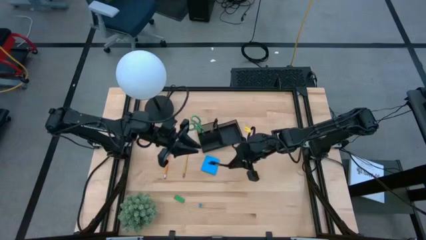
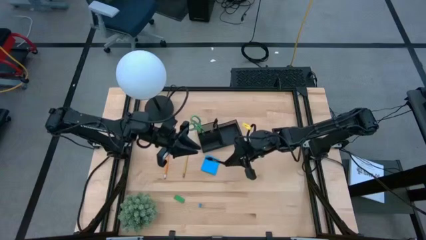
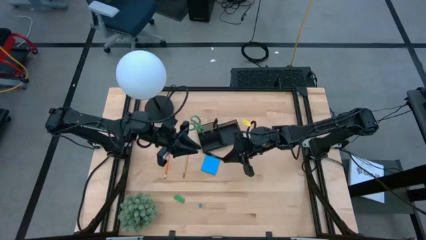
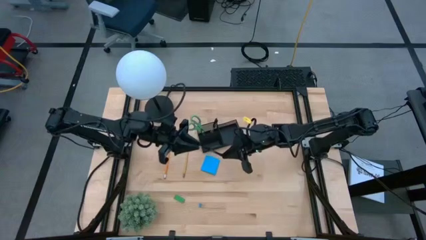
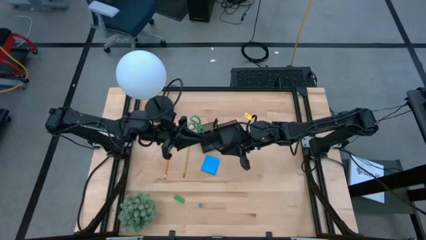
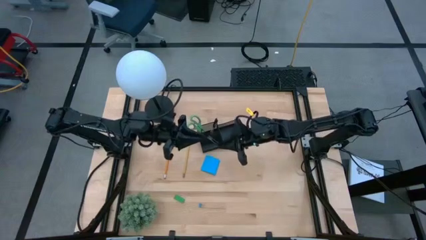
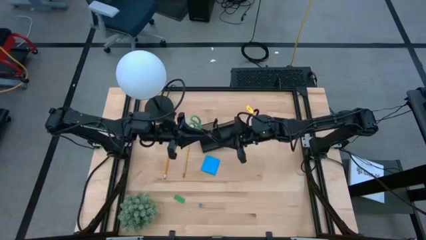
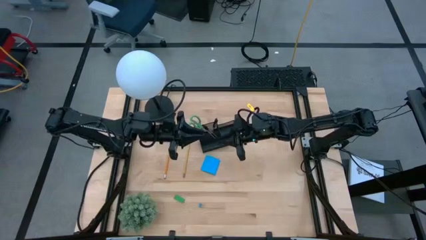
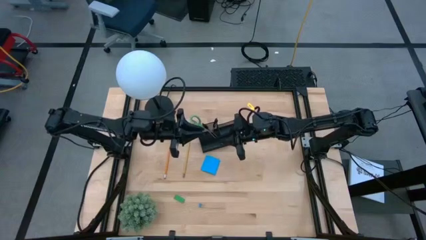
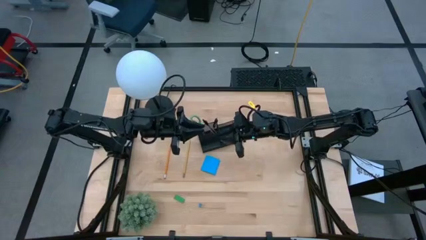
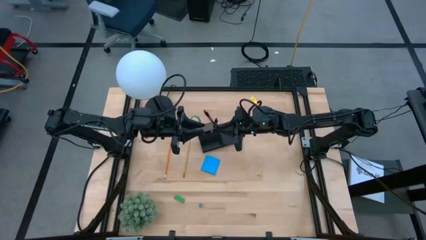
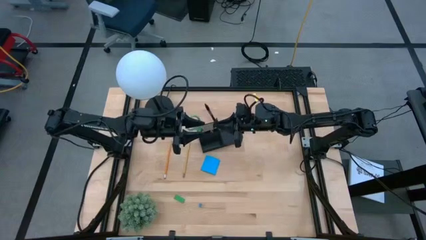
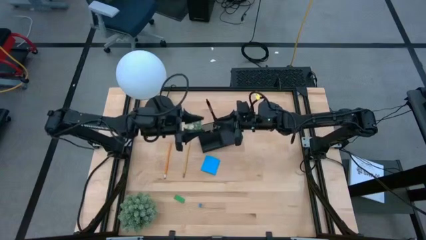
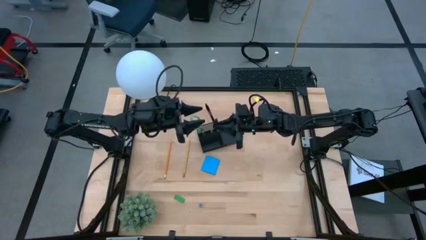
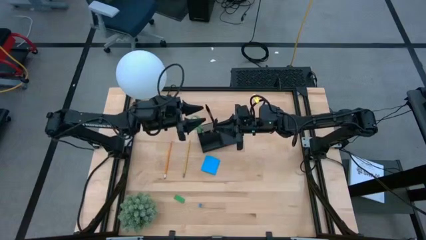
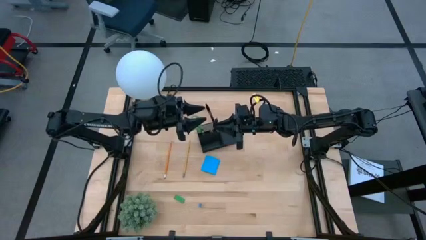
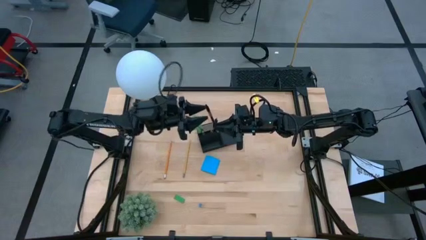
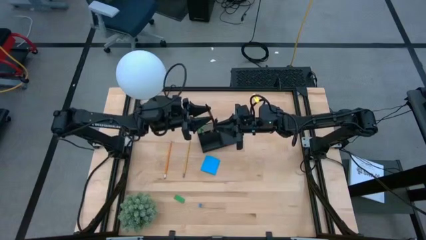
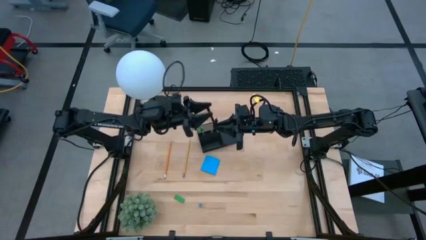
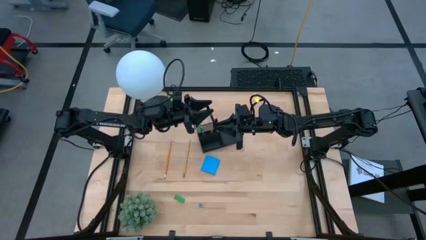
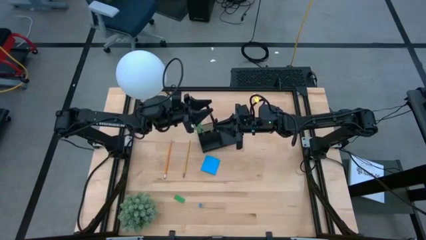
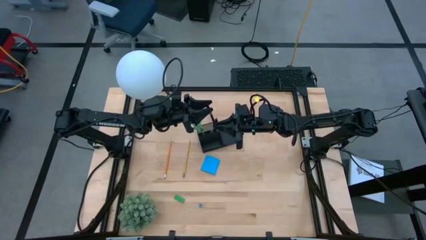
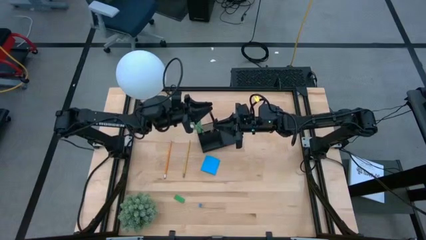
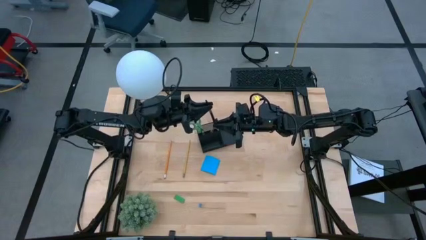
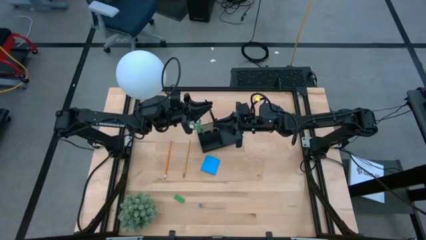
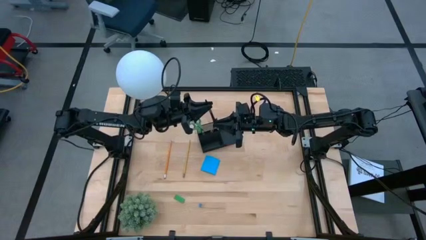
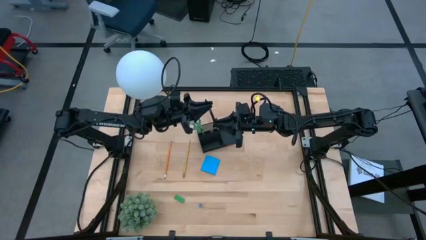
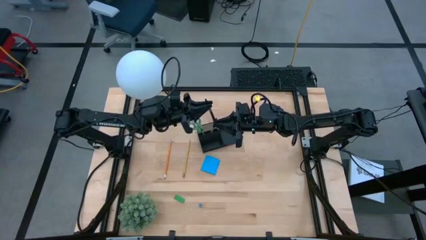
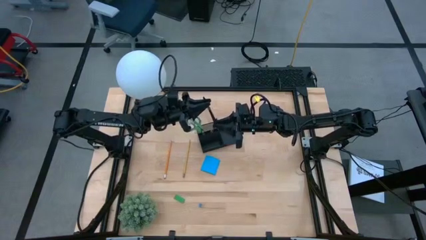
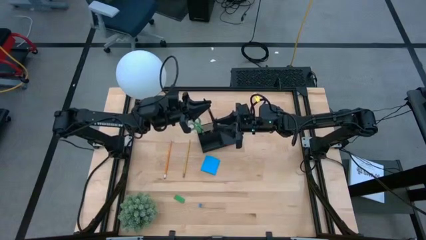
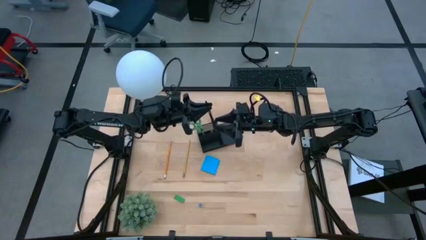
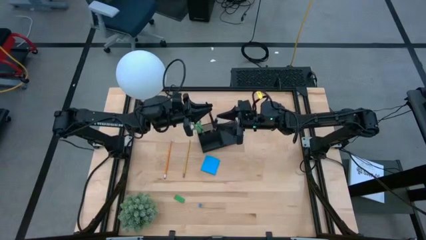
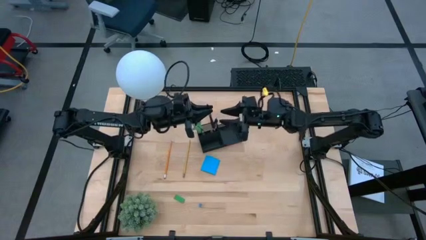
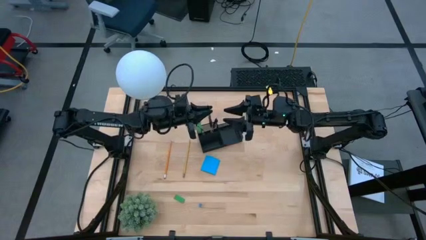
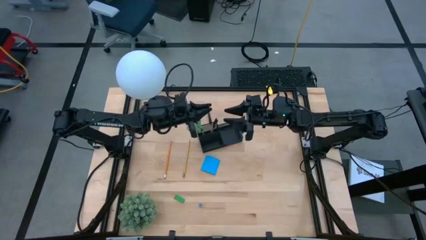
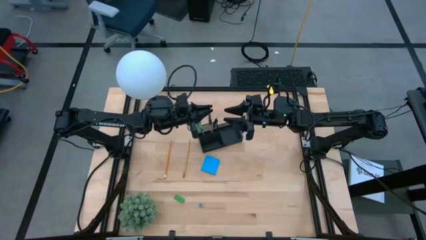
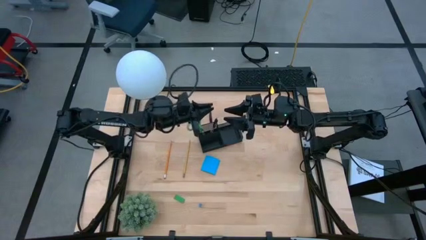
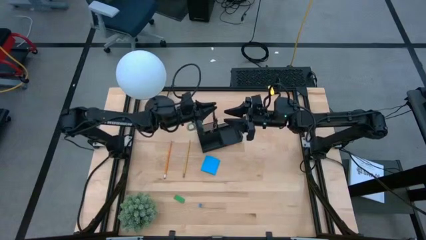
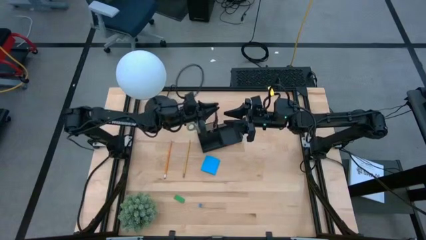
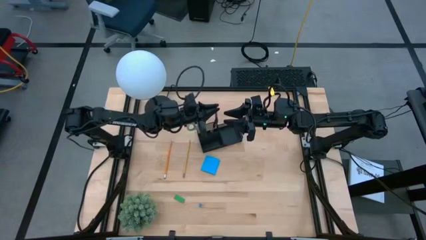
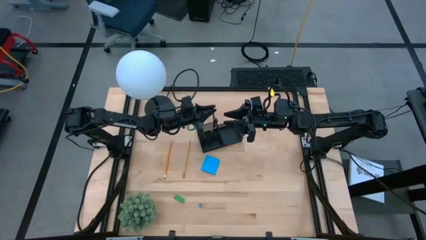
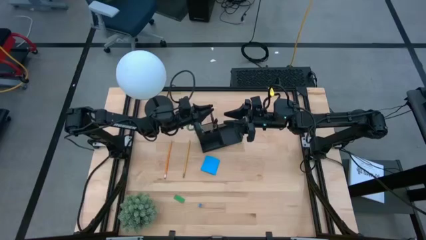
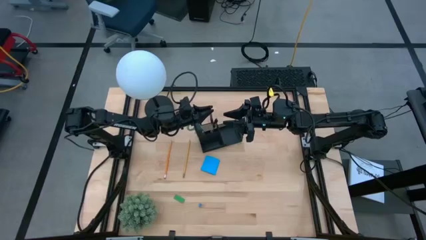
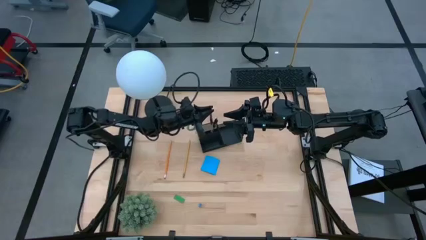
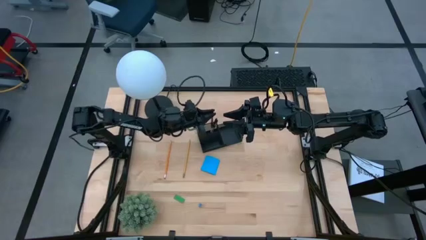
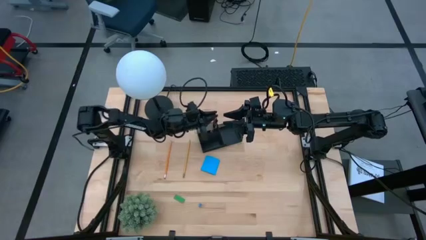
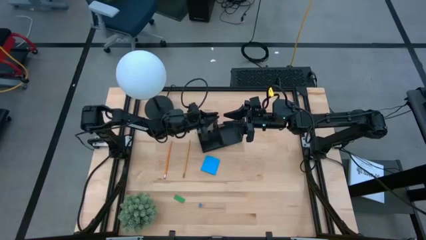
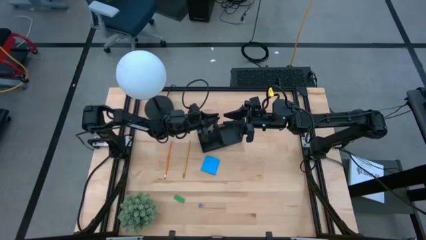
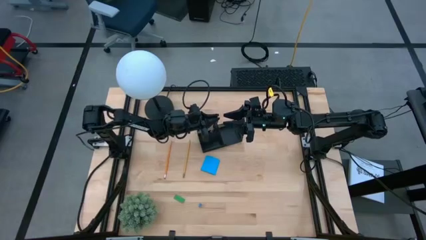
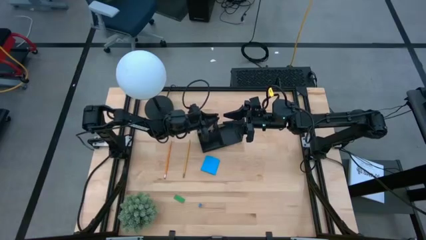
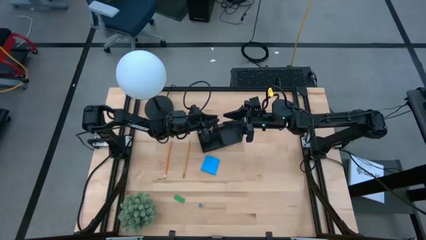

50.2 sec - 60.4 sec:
Task: Pick and place office supplies into organizer
Put the black pen into the black desk organizer

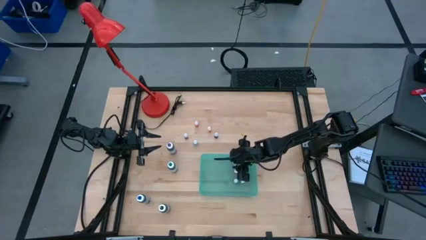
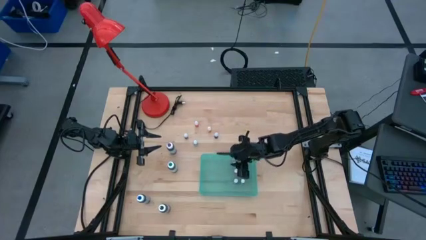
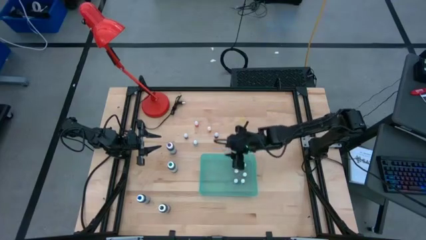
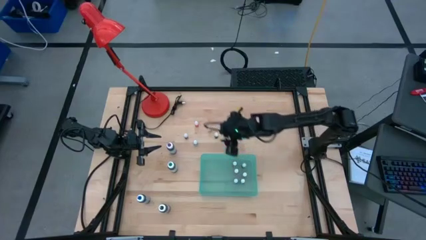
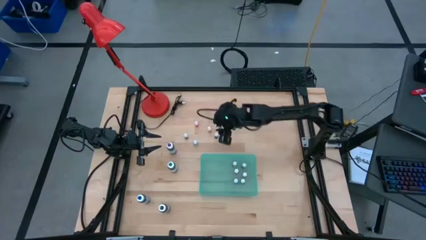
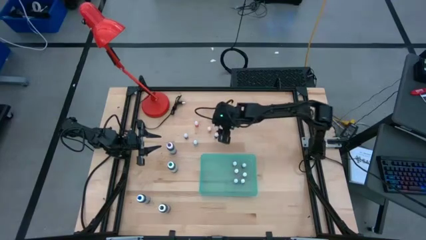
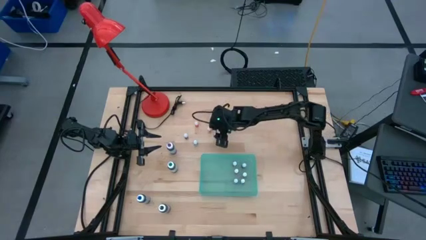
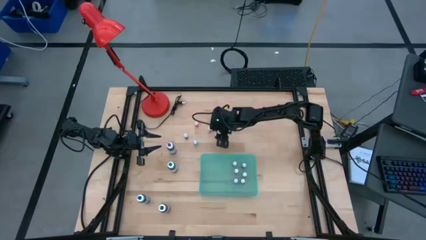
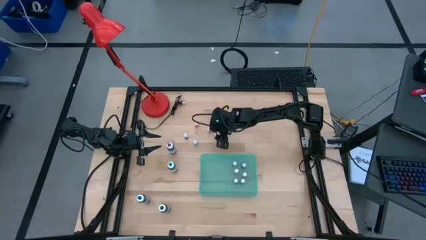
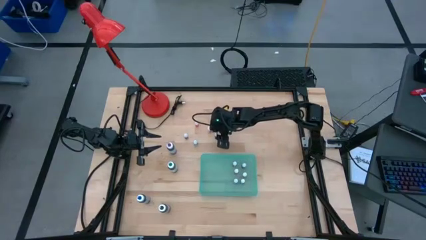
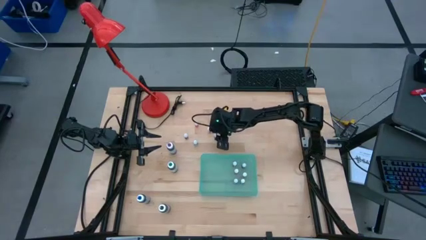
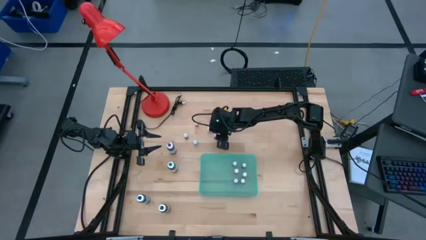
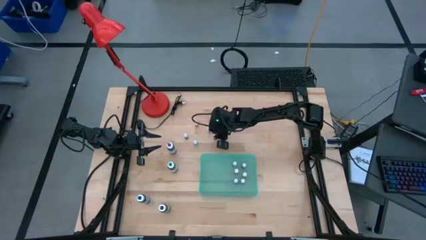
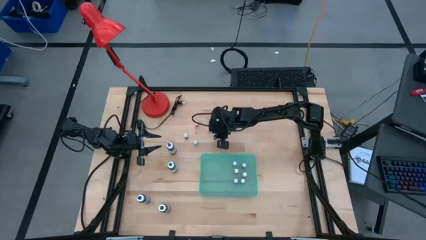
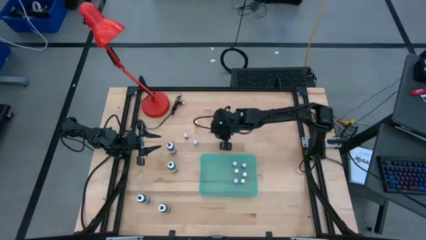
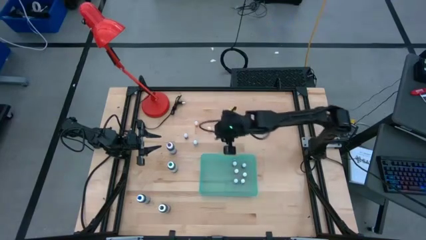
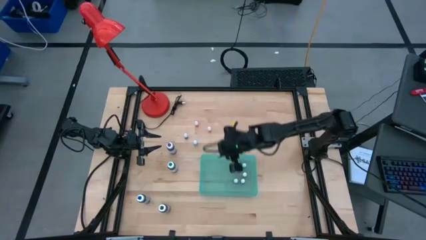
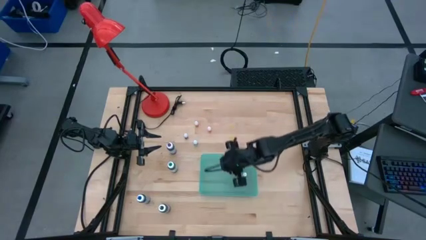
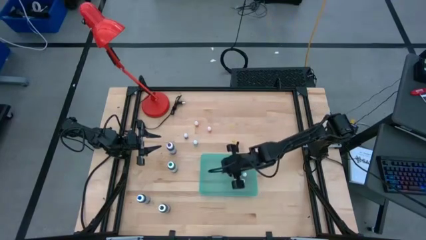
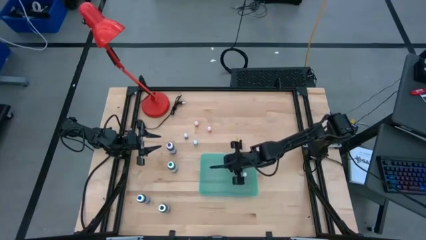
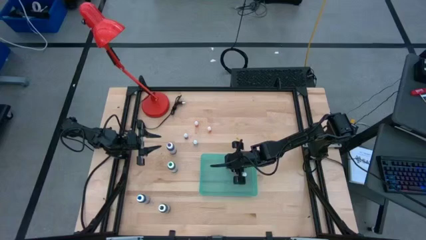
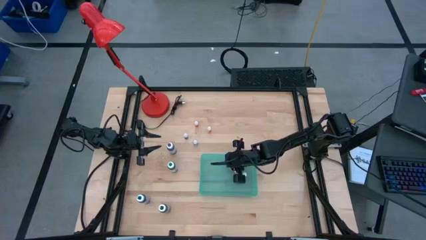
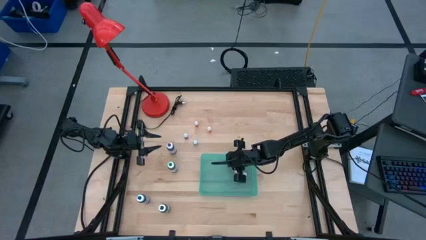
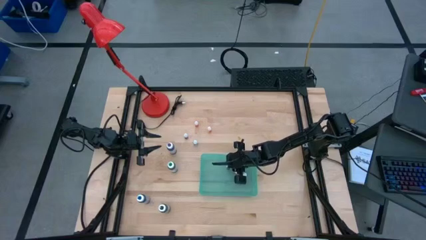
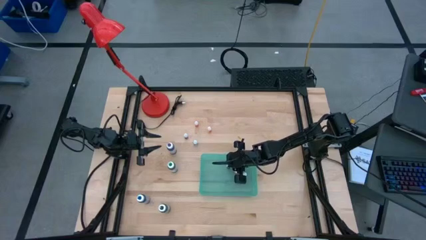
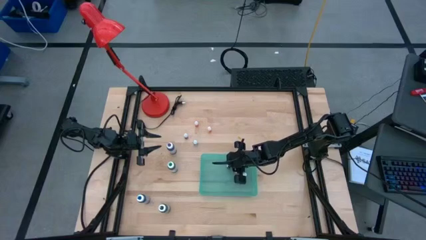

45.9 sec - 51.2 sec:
Task: Pick & Place food coloring
Put the small blue food coloring bottle into the green bin
